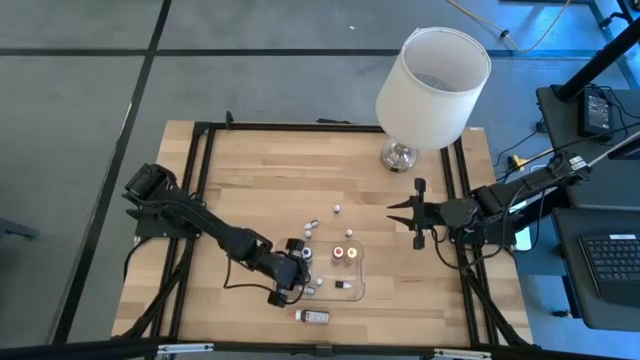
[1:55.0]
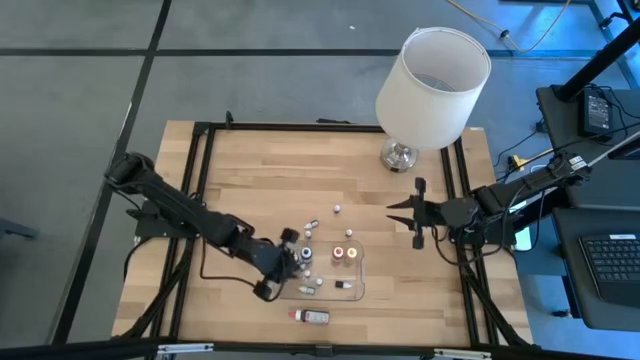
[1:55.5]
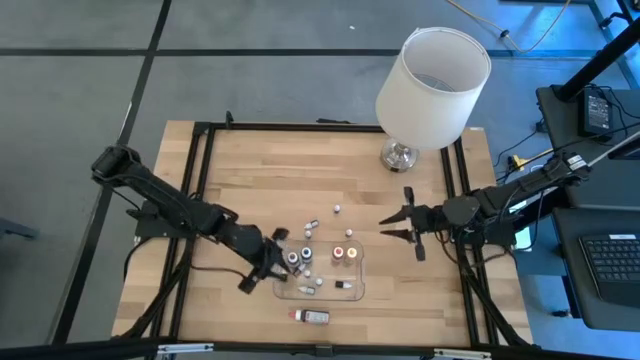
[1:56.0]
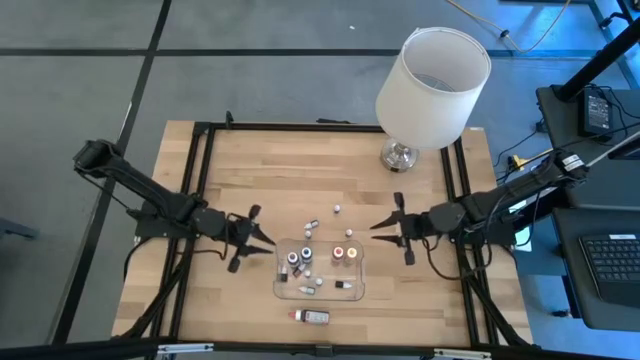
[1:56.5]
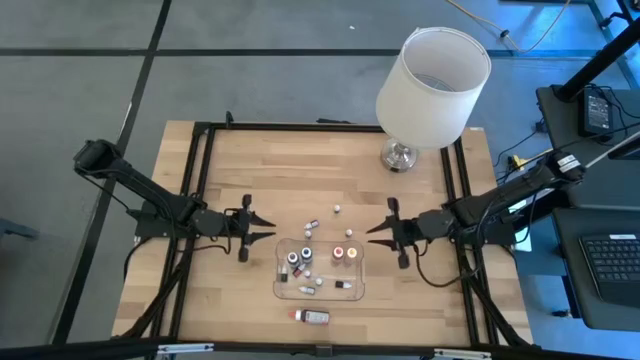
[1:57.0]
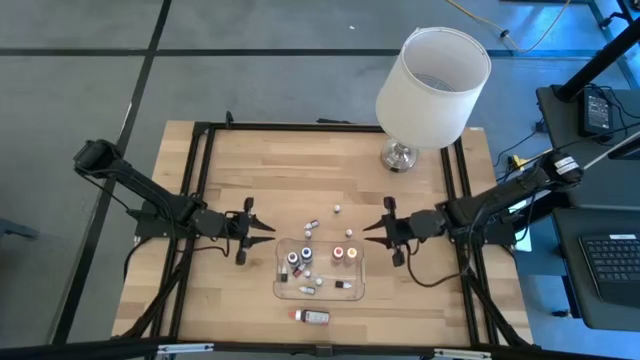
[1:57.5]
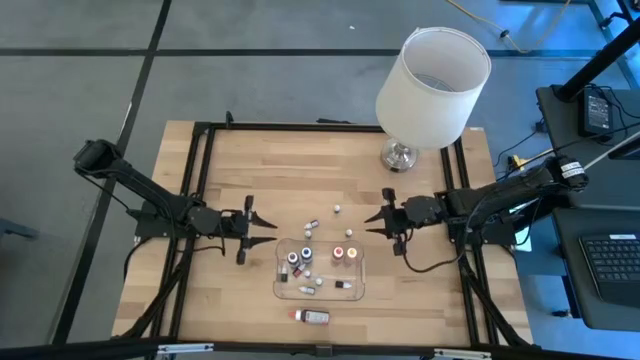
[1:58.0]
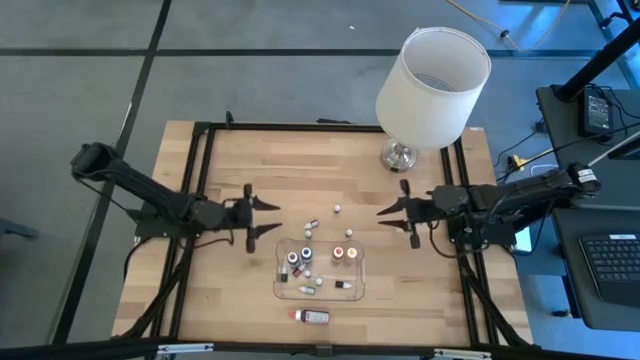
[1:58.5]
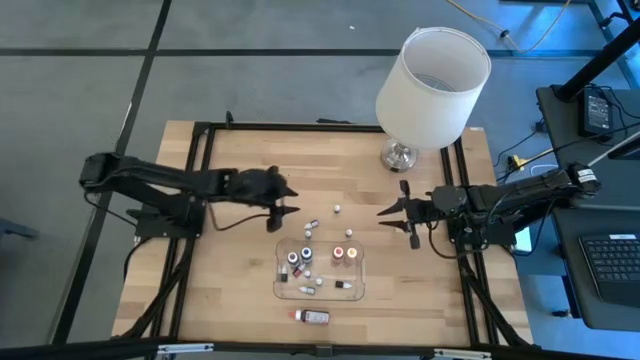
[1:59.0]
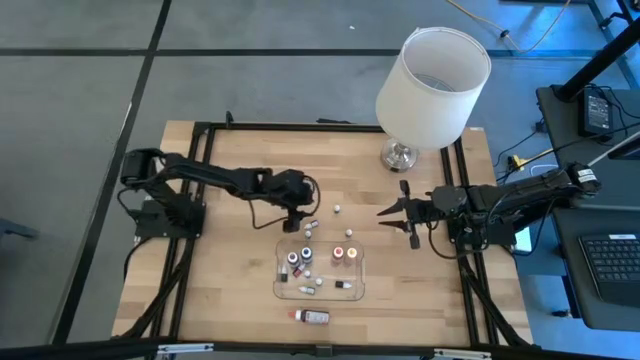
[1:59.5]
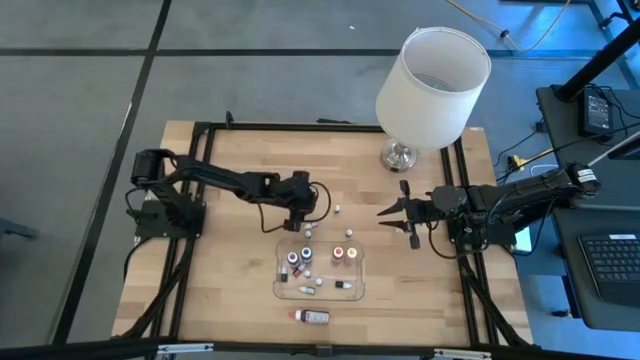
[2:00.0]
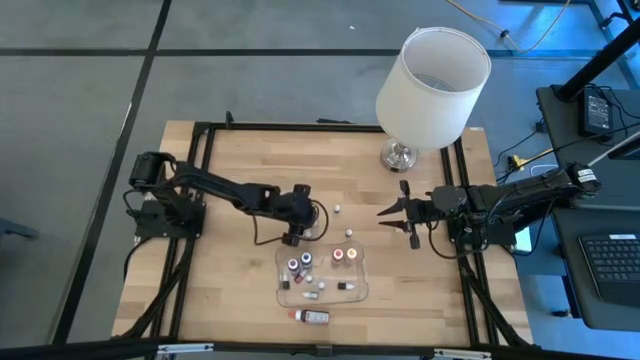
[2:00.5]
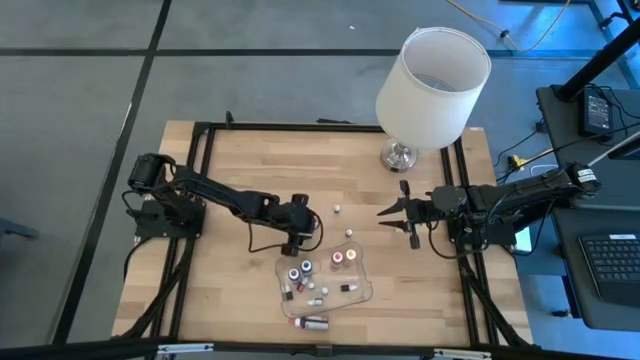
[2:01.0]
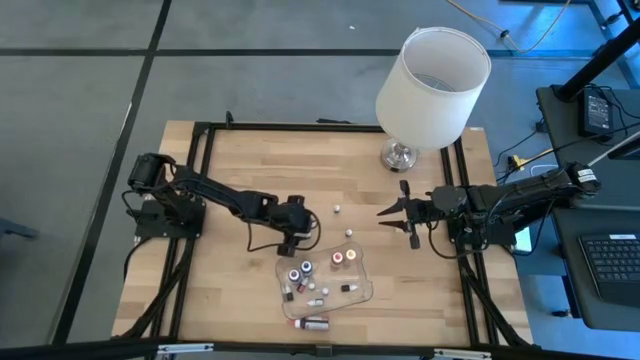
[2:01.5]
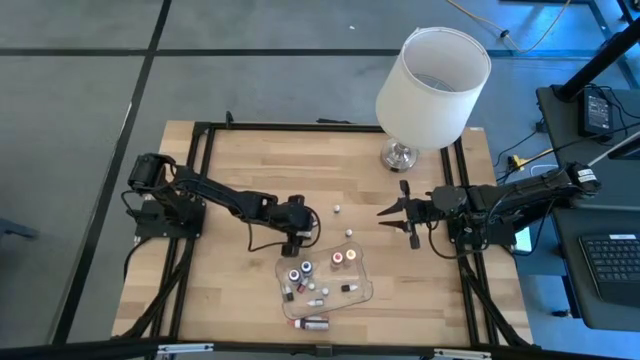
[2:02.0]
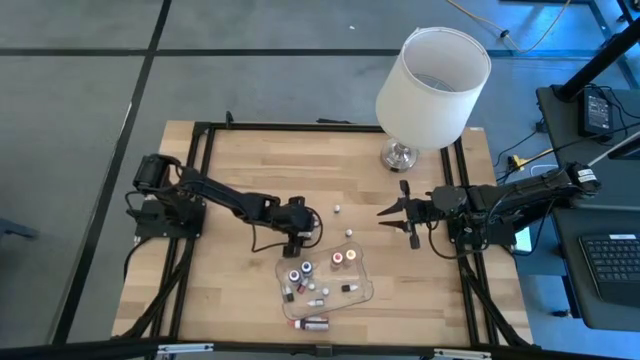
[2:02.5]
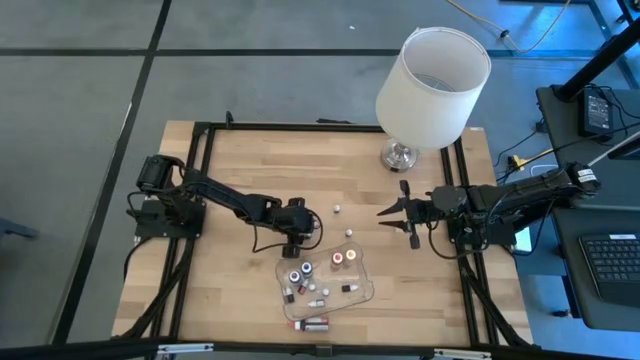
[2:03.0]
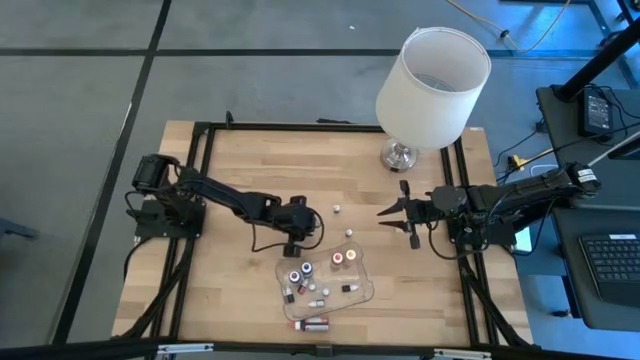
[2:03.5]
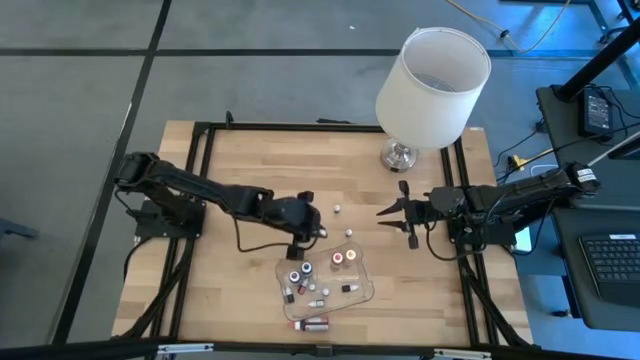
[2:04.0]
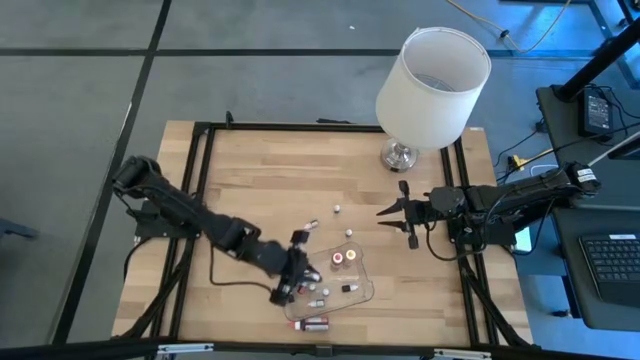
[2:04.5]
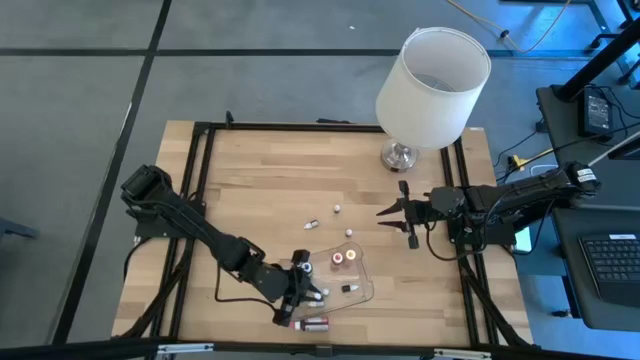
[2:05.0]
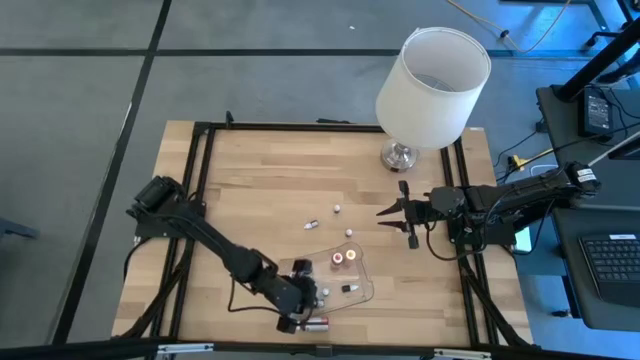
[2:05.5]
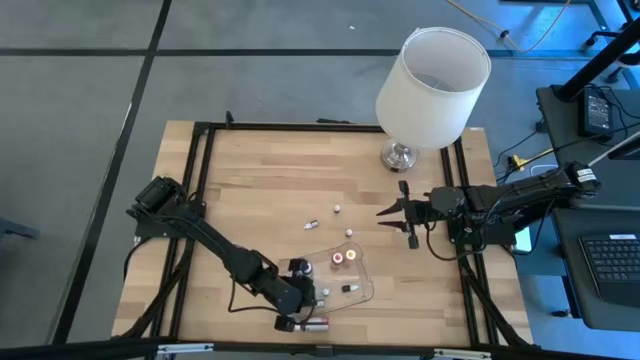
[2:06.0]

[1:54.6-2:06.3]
Task: Pick & Place food coloring
Put the small white food coloring bottle into the container

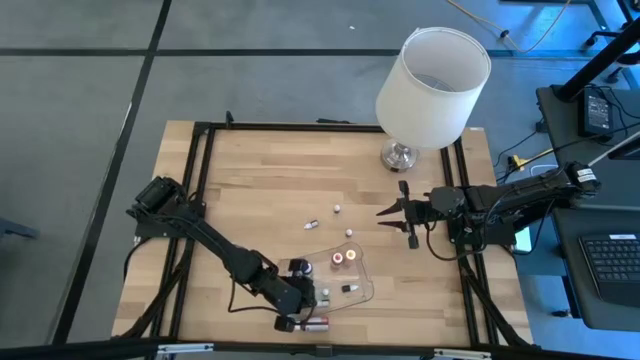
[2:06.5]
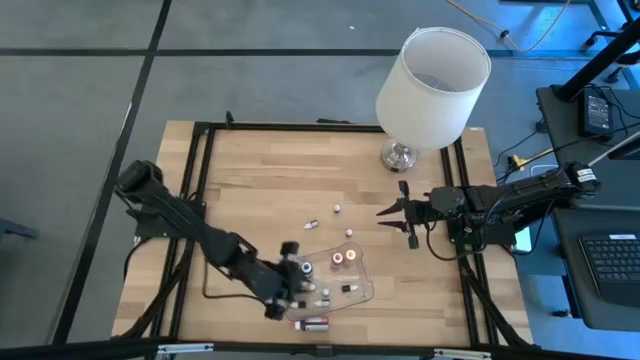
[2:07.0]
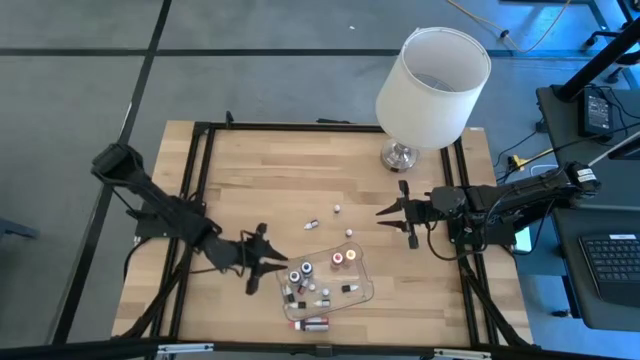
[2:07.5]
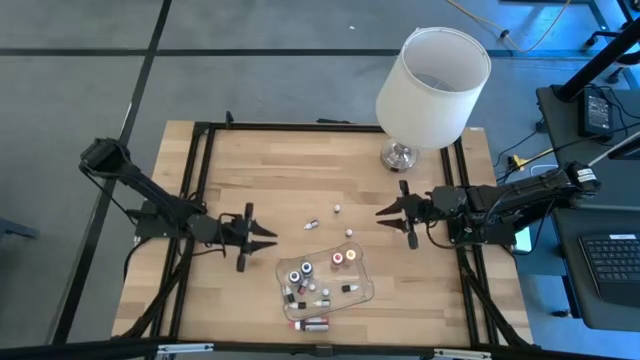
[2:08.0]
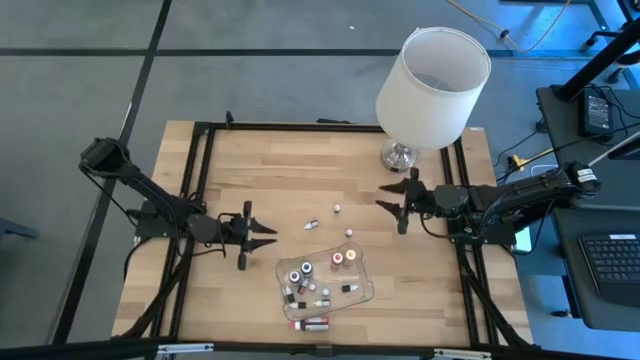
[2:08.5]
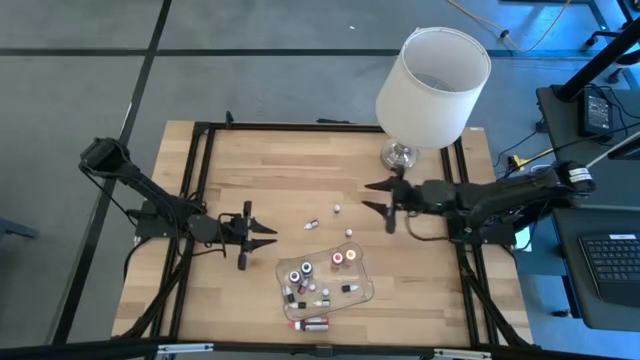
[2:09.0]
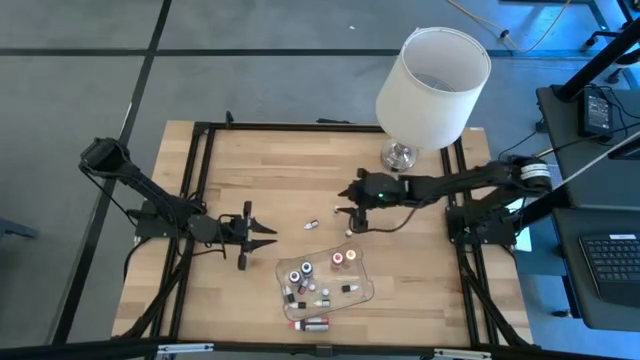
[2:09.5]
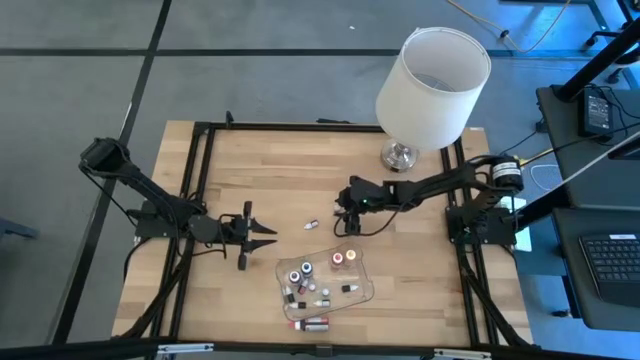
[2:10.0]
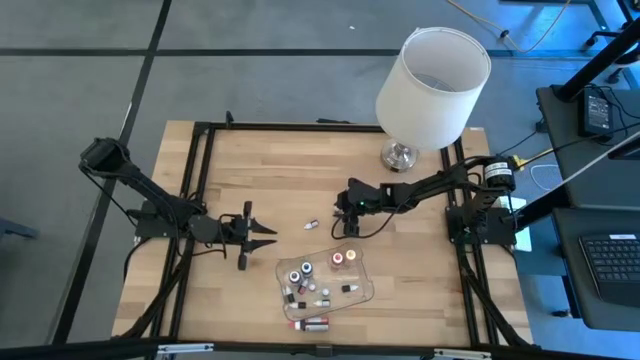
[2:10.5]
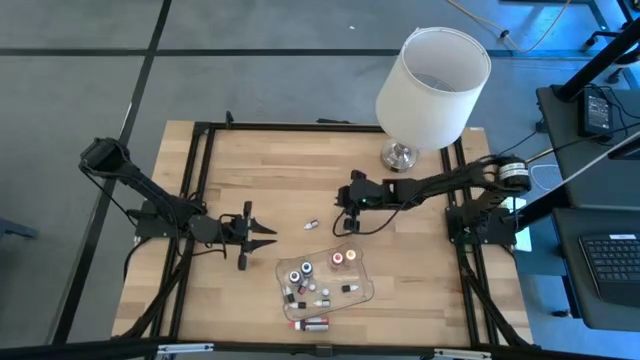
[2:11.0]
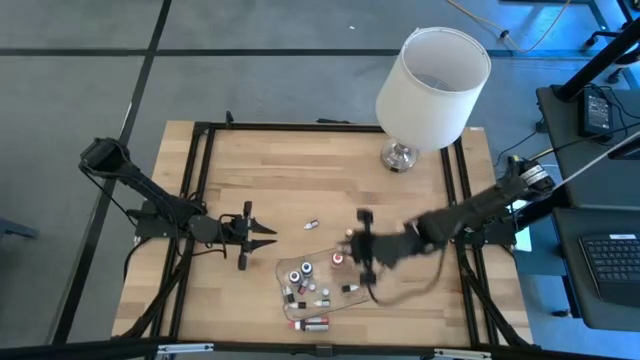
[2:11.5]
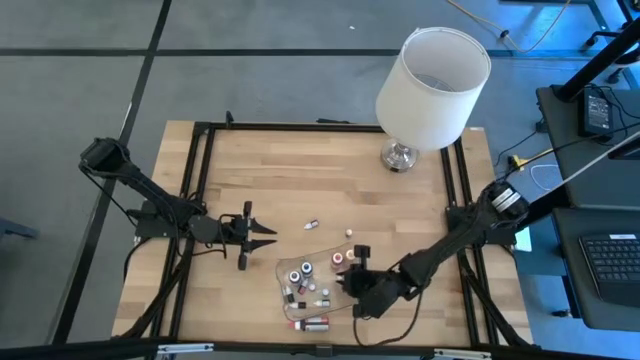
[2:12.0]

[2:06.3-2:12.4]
Put the small white food coloring bottle into the container

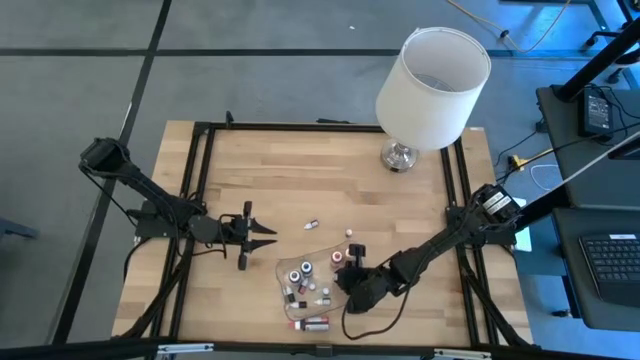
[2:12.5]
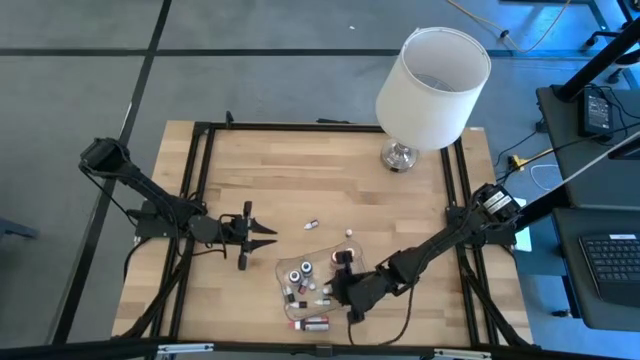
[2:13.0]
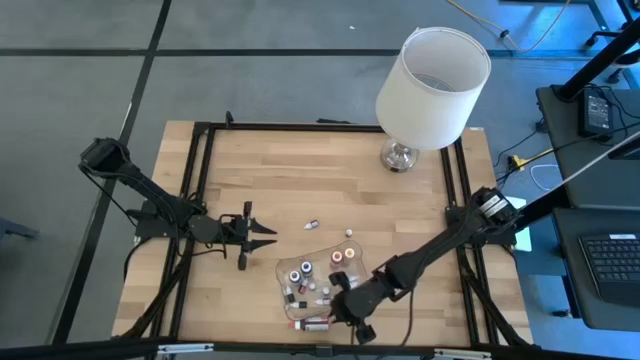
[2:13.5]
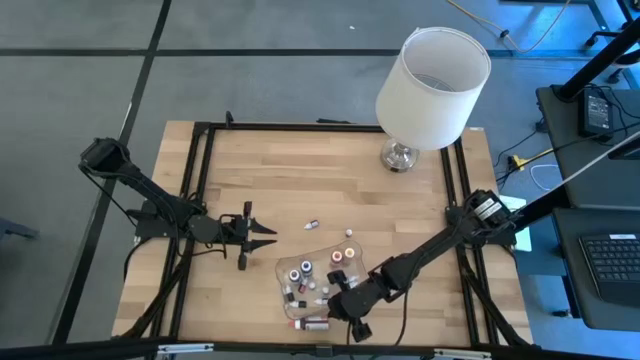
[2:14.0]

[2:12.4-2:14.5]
Adjust the container

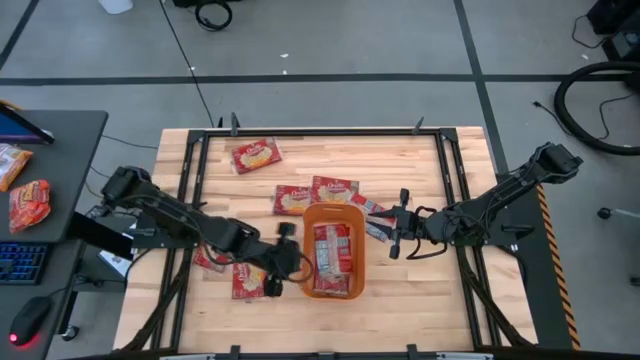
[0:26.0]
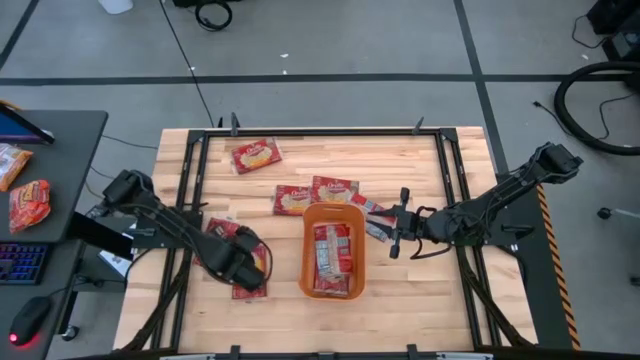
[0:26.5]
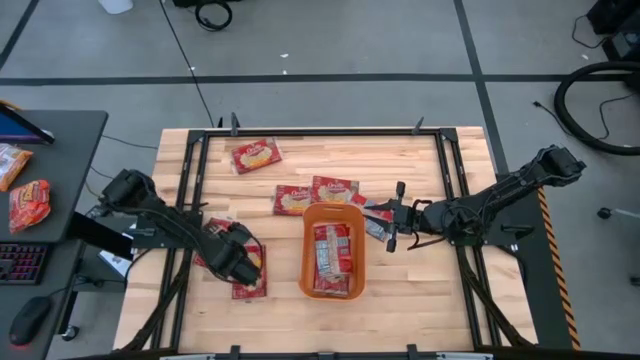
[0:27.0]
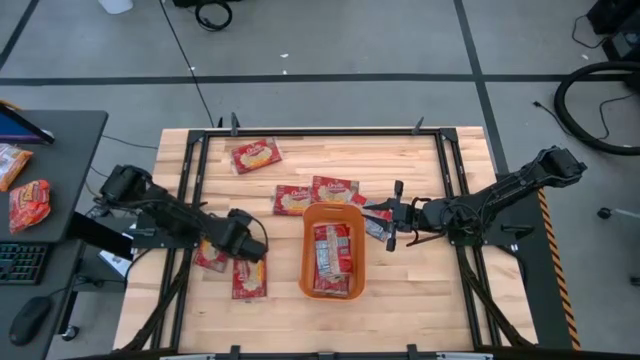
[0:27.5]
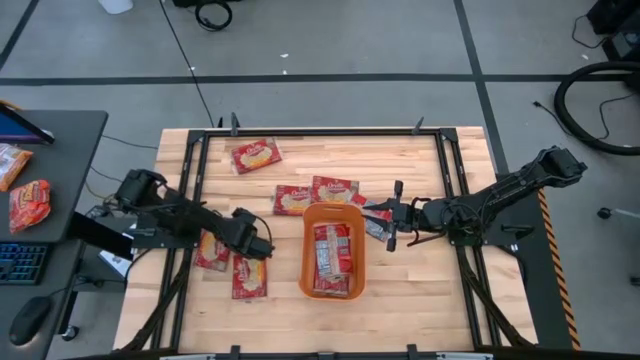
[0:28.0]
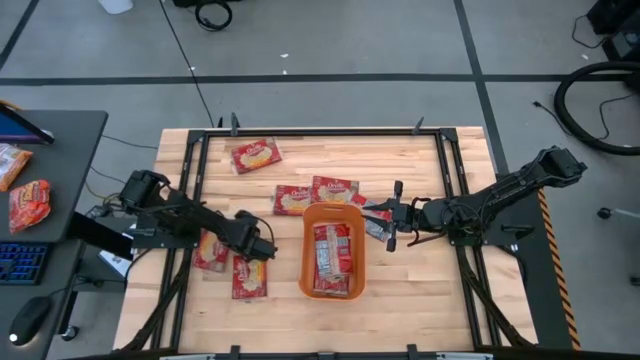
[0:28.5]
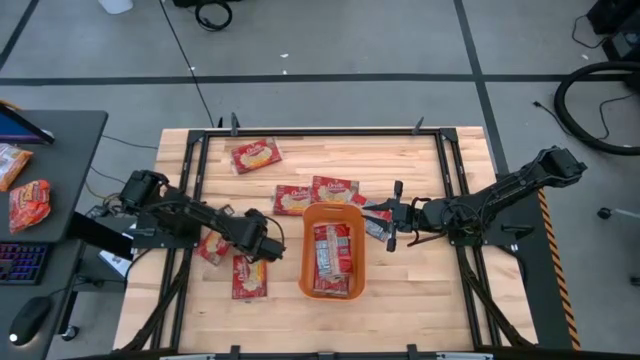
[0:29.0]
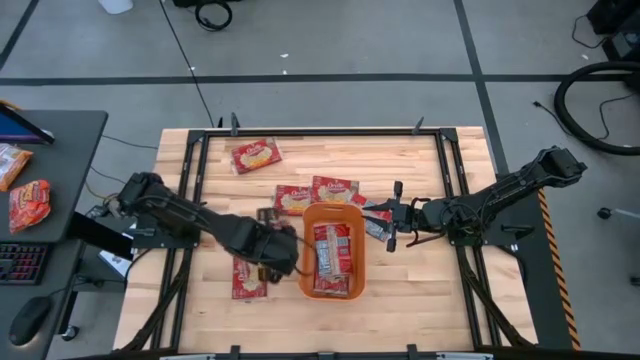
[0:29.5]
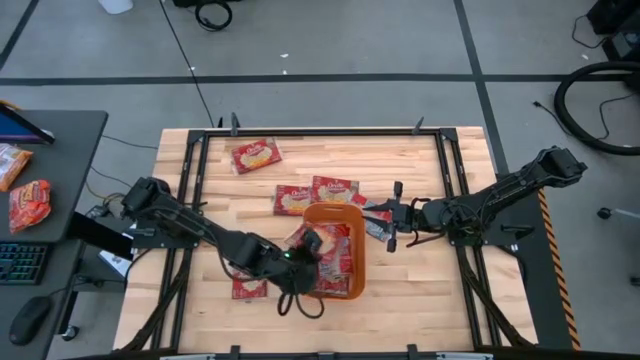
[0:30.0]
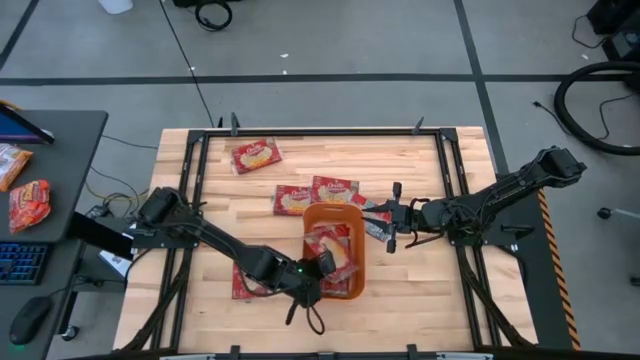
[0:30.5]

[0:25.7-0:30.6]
Task: Sort popcorn bags into baskets
Put the red popcorn bag into the orange bin
